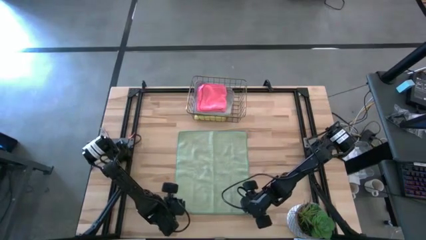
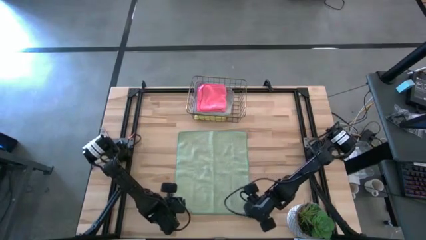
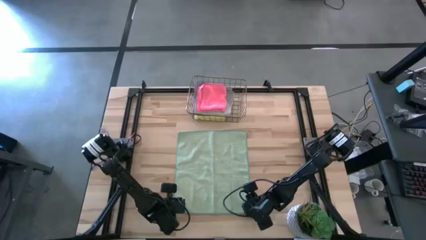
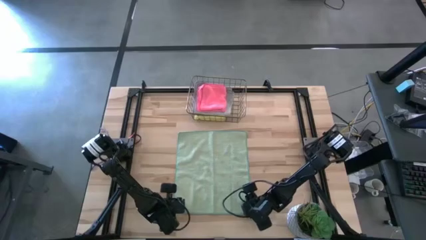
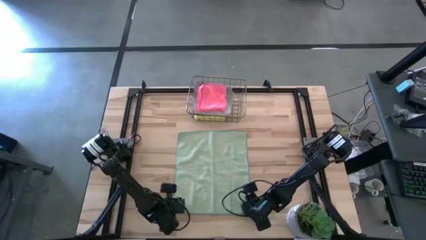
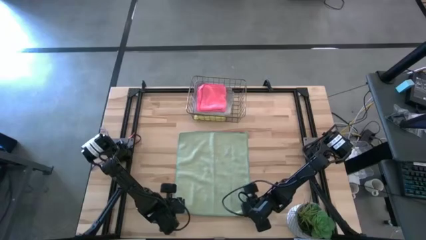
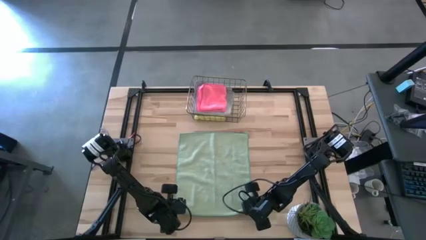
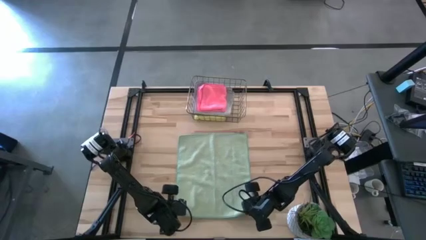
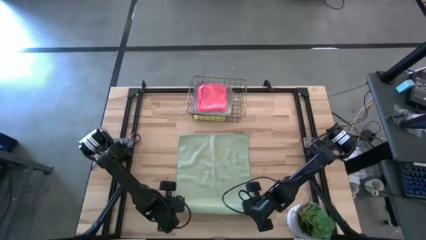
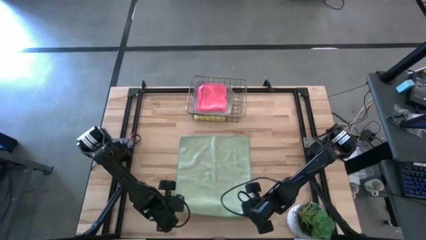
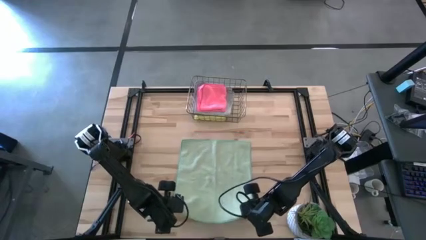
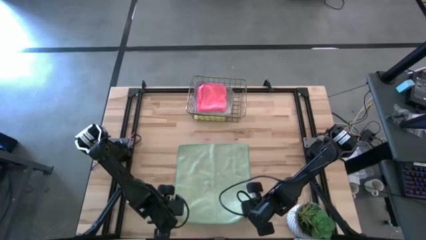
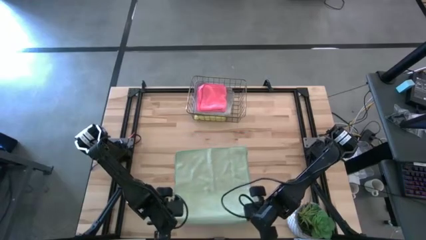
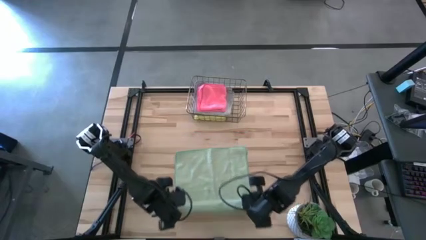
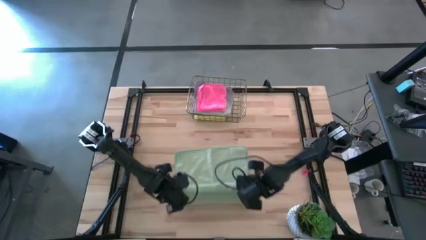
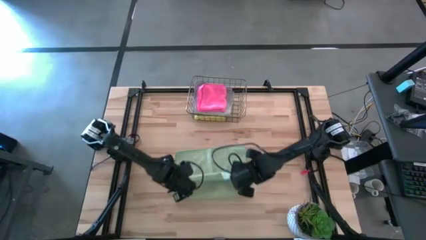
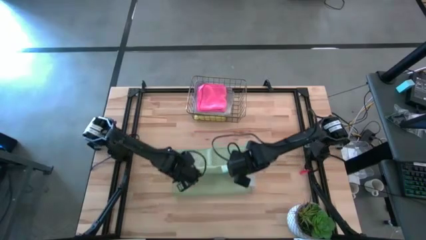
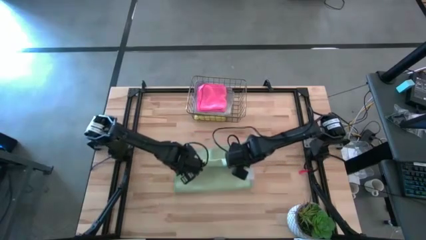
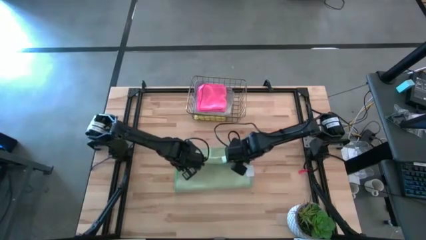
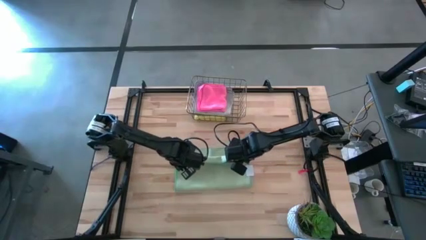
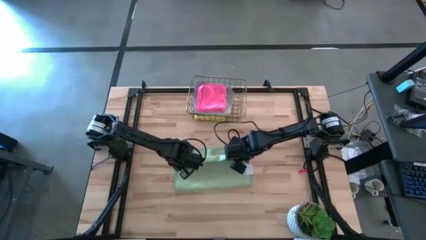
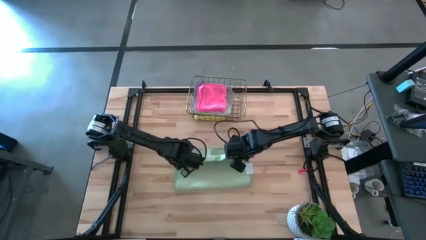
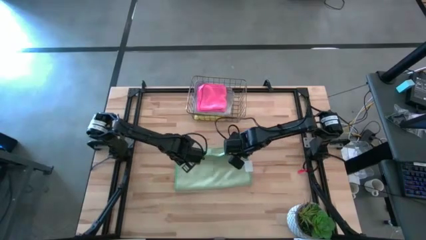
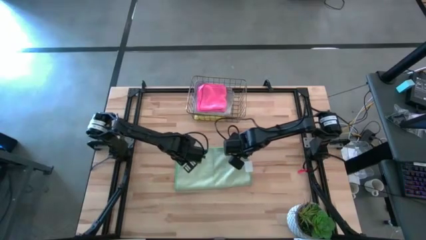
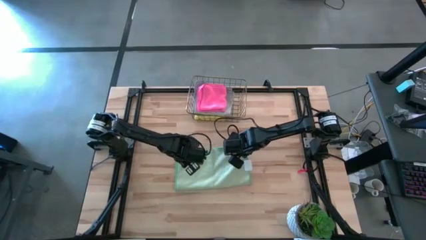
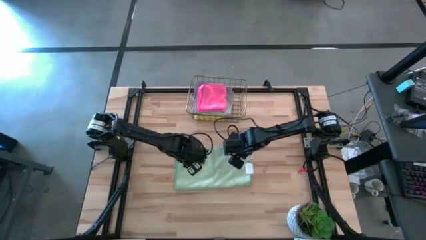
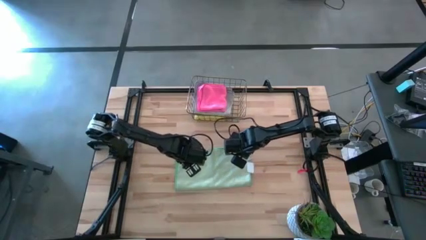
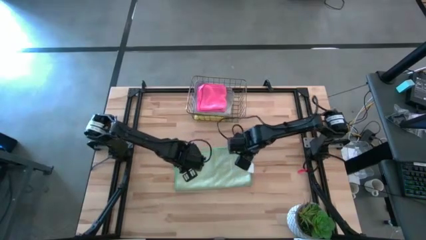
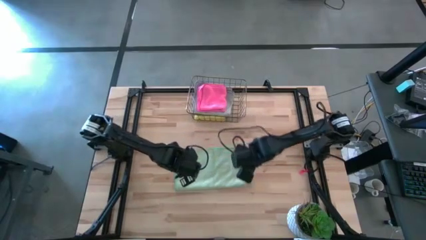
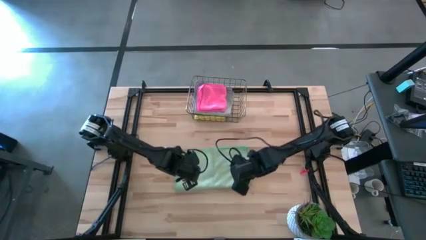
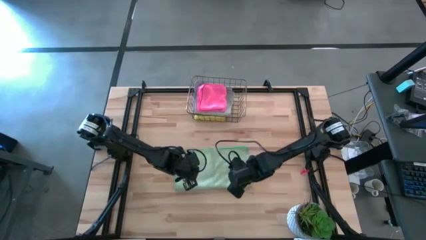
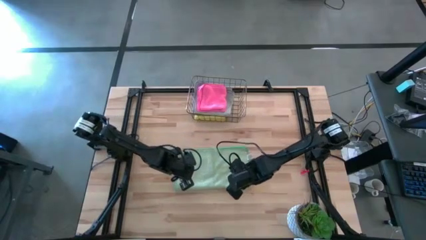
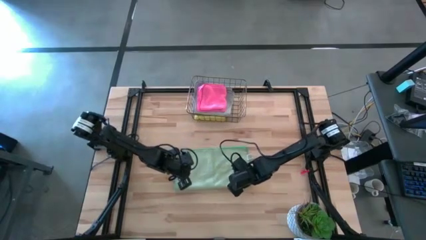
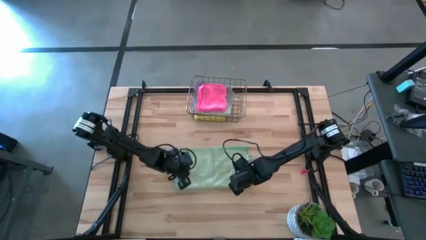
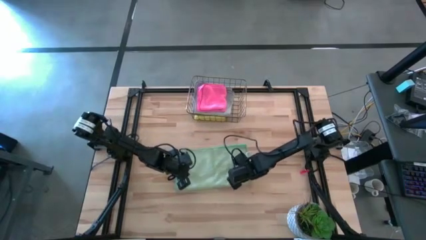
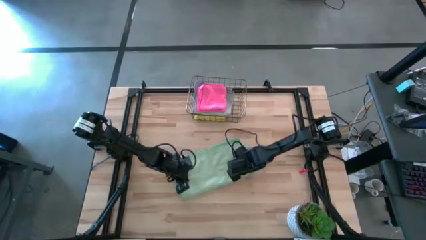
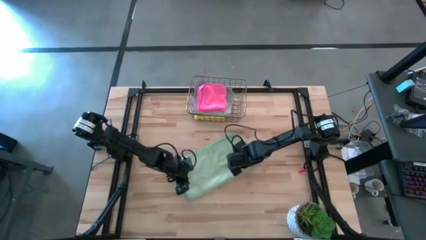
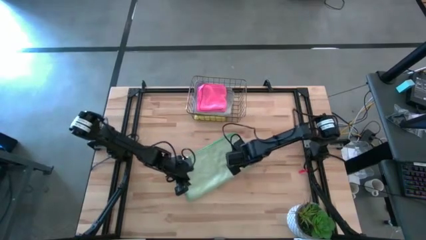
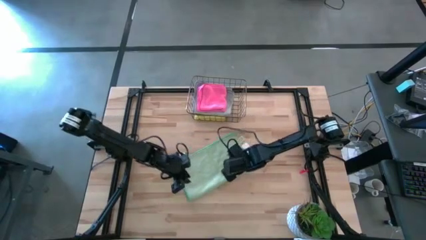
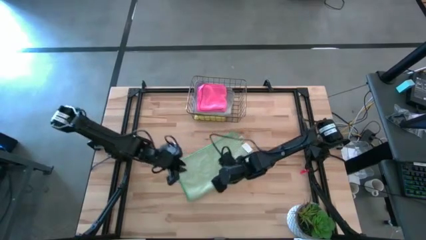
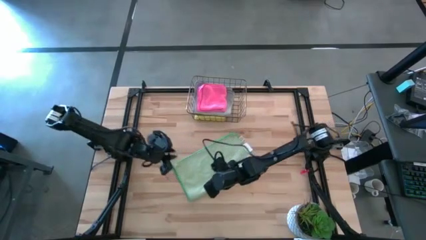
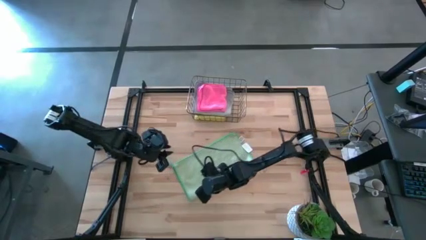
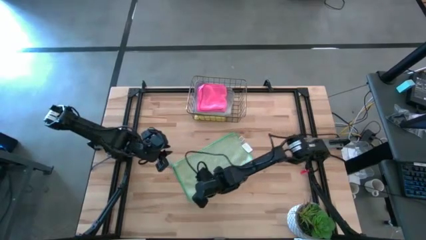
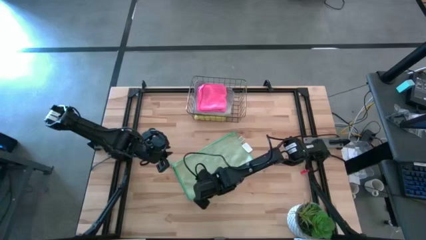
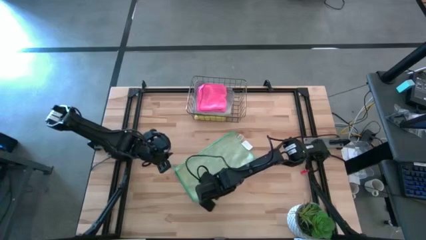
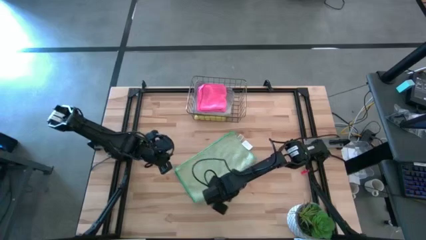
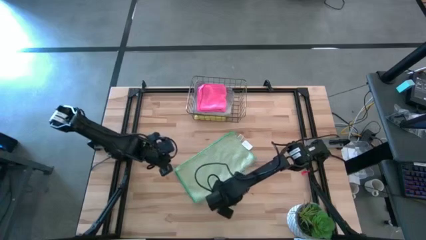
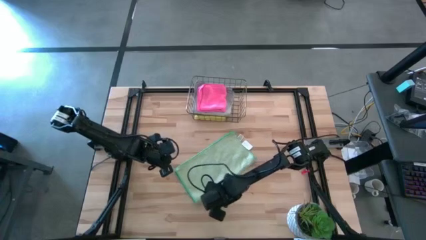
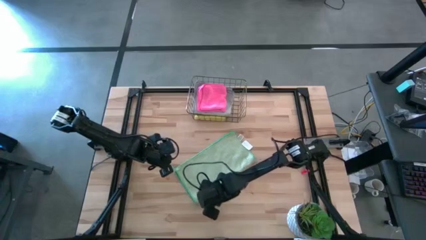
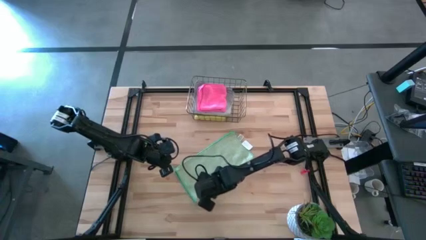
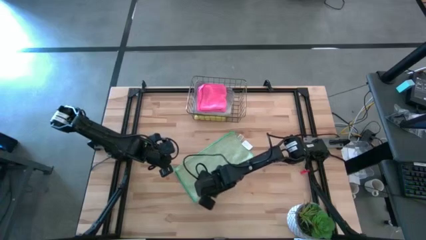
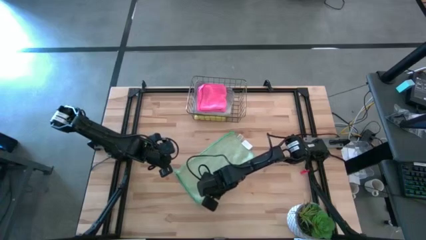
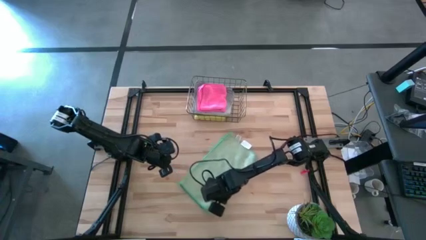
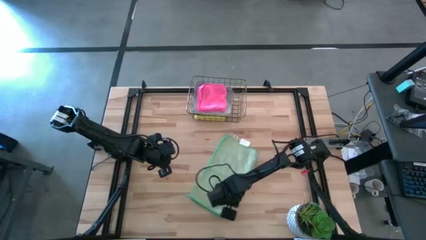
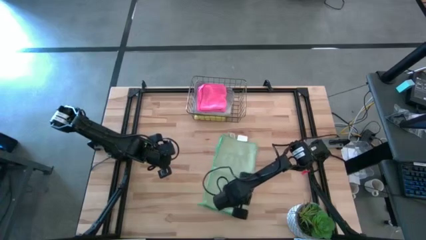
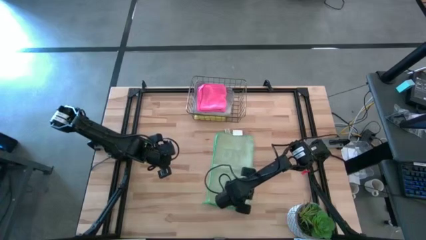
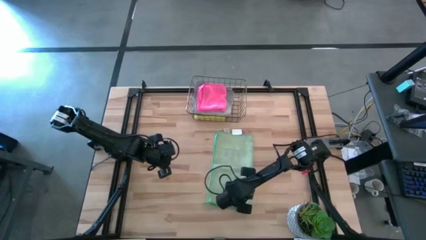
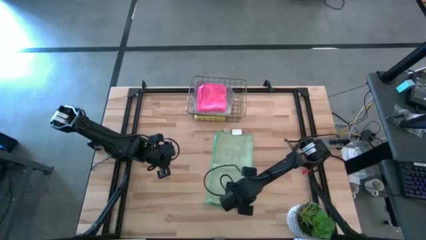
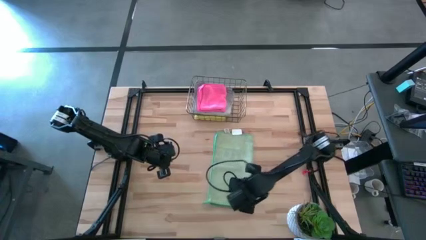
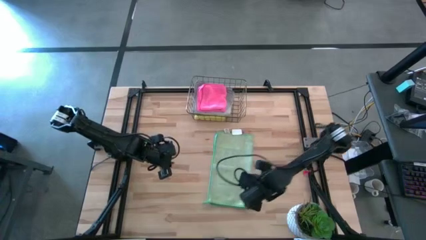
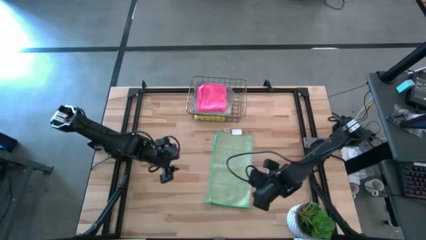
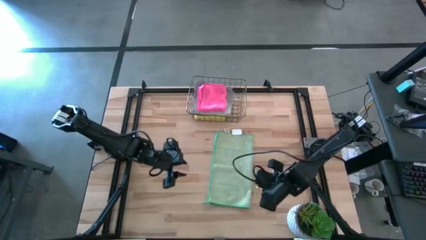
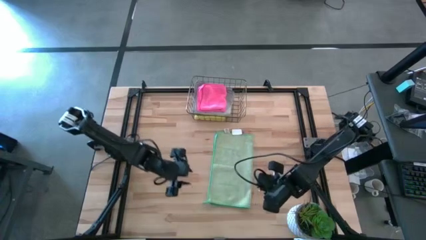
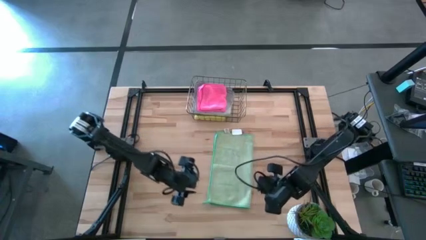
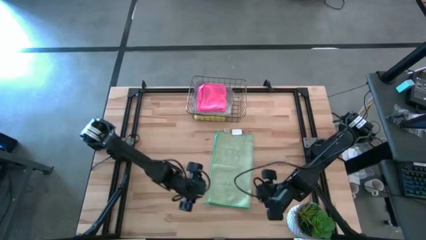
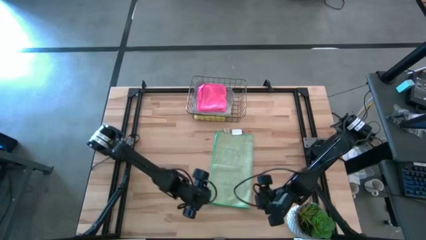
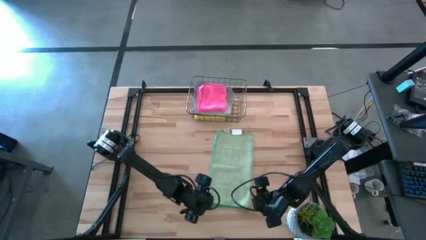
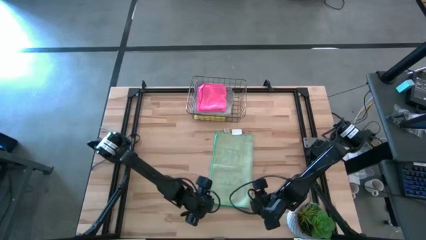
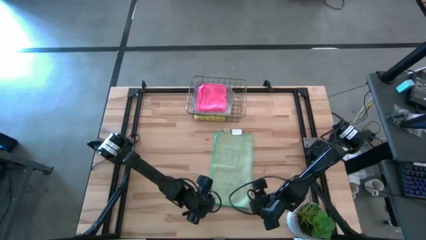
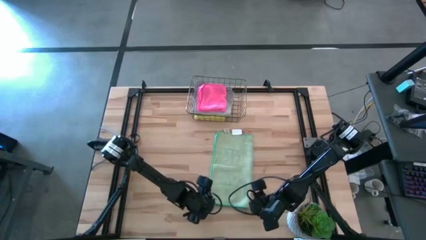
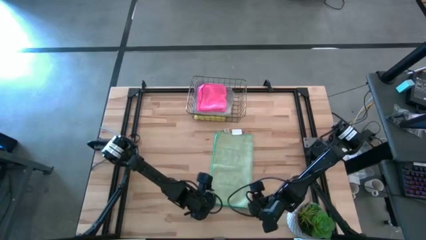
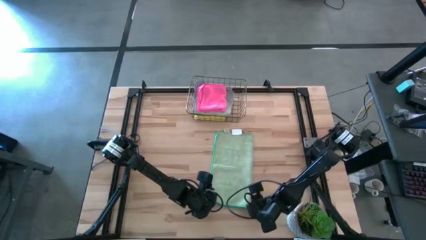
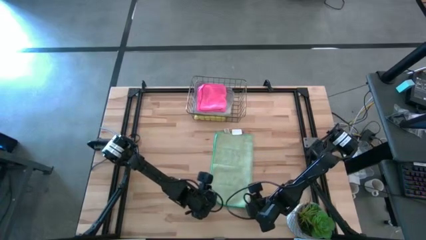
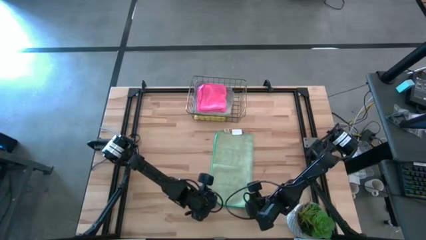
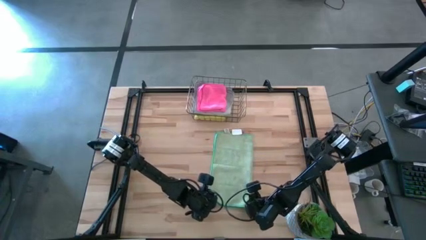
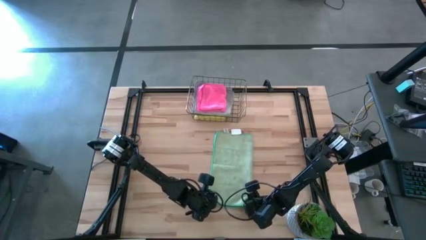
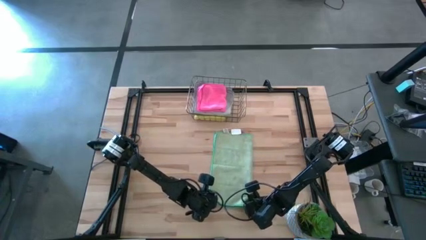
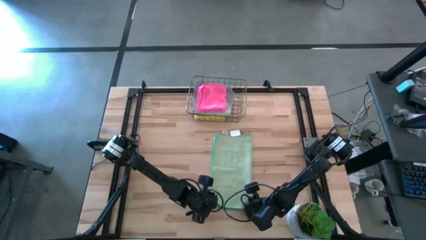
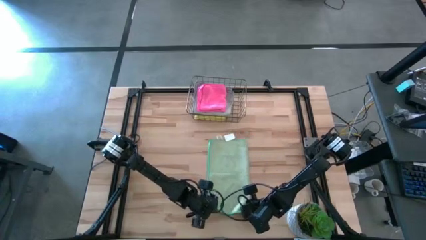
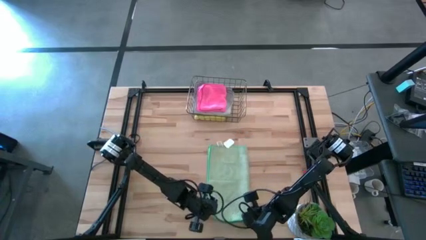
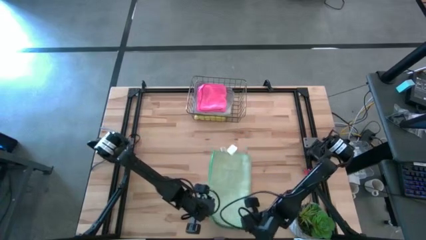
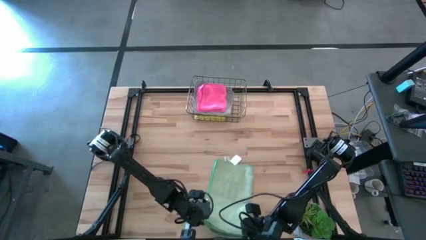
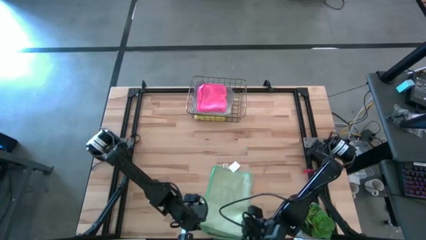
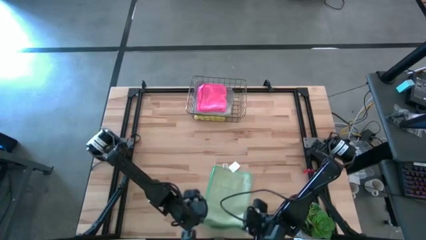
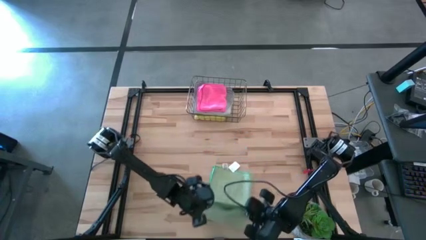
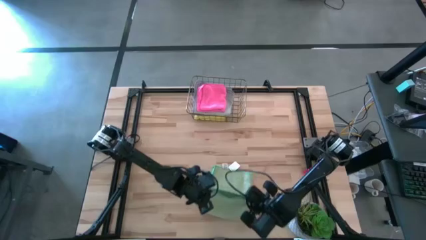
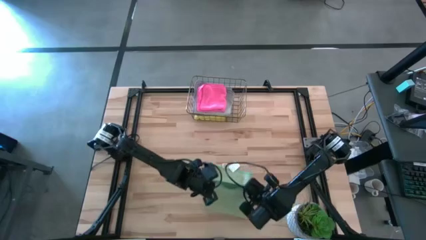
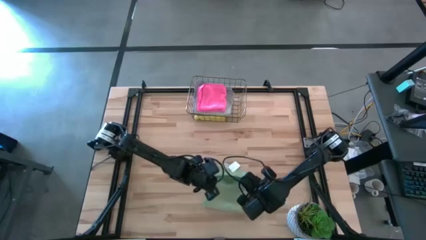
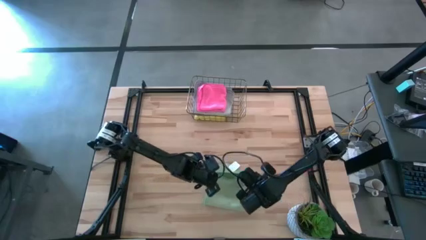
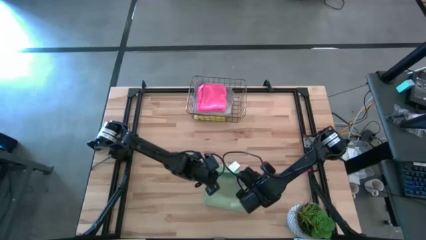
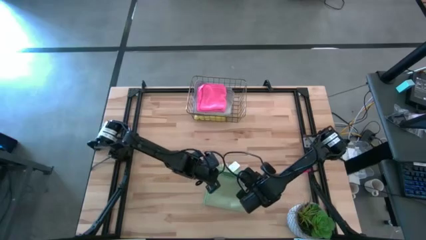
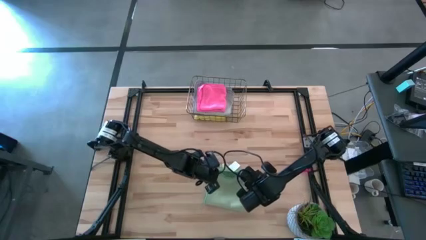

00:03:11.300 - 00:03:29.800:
Task: Fold microfiber towels
Fold the blue towel
